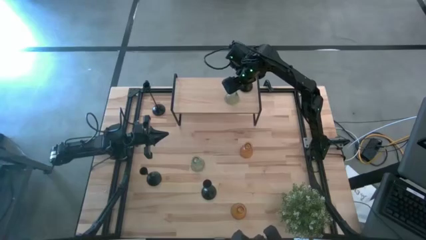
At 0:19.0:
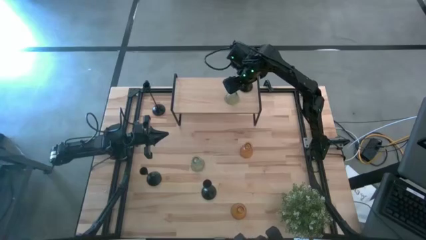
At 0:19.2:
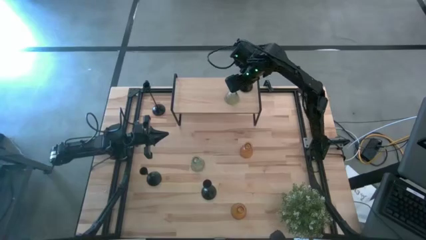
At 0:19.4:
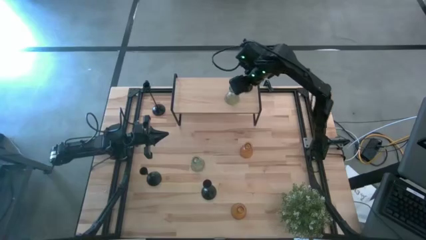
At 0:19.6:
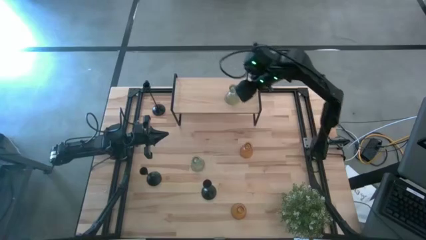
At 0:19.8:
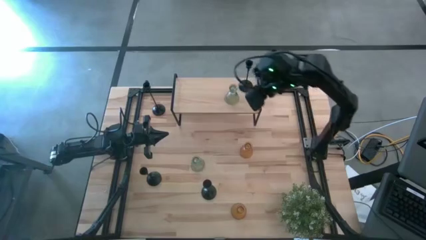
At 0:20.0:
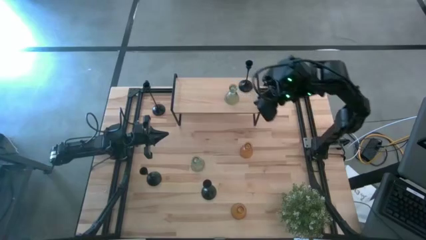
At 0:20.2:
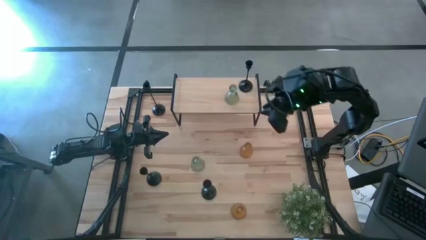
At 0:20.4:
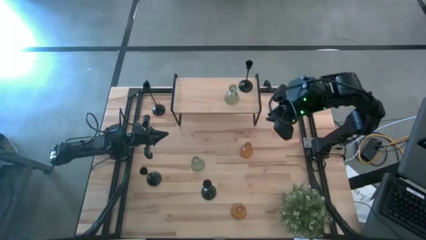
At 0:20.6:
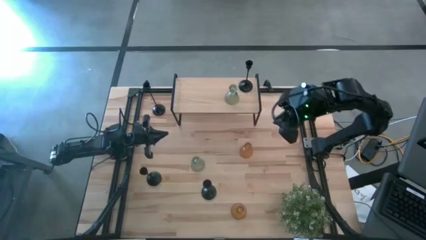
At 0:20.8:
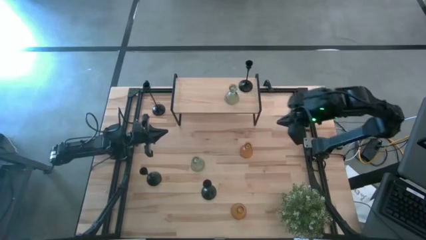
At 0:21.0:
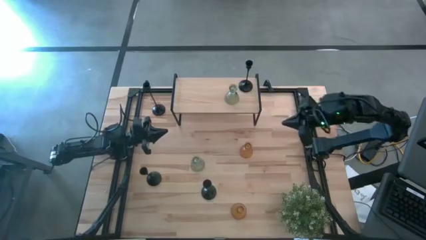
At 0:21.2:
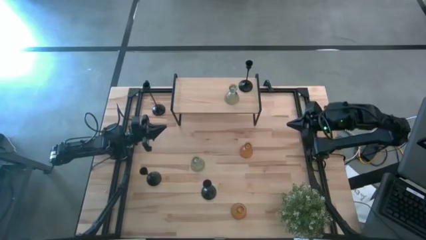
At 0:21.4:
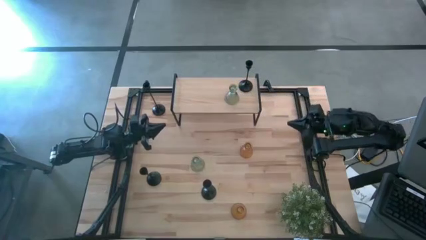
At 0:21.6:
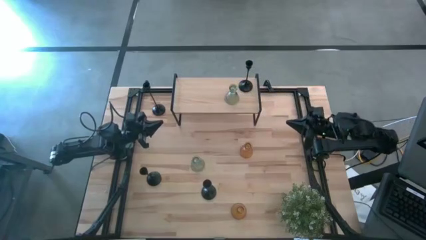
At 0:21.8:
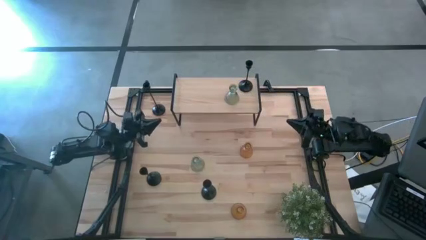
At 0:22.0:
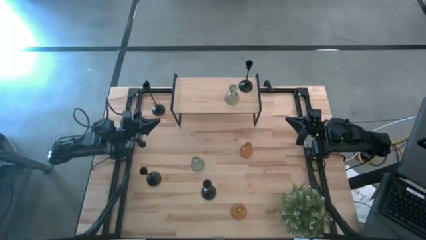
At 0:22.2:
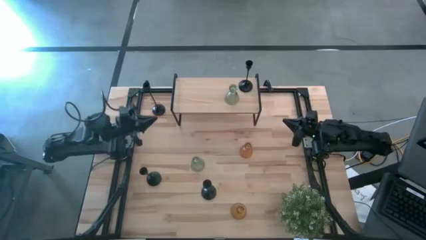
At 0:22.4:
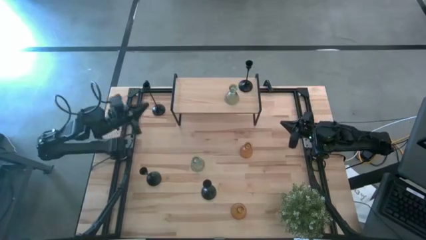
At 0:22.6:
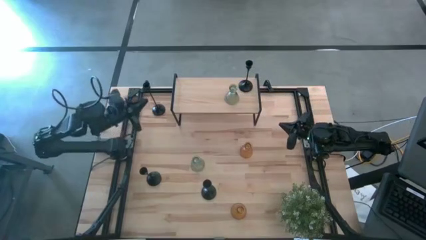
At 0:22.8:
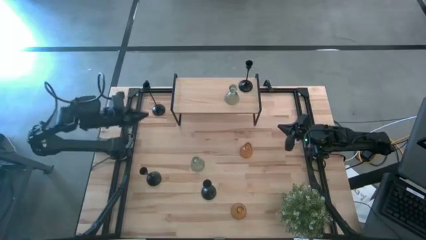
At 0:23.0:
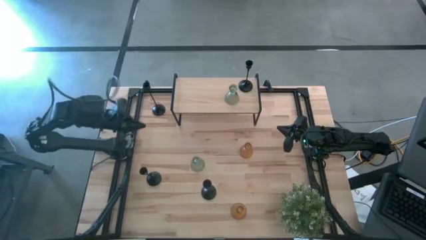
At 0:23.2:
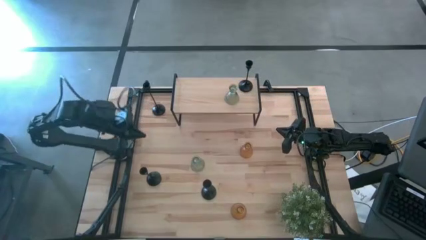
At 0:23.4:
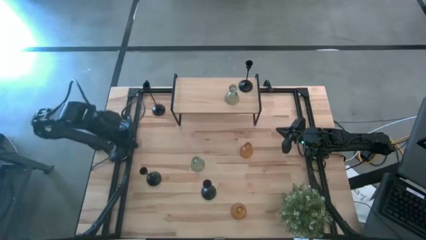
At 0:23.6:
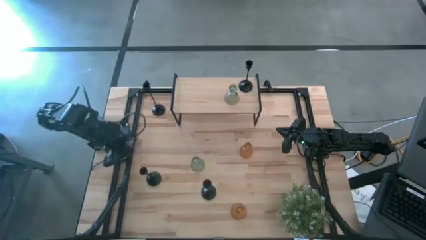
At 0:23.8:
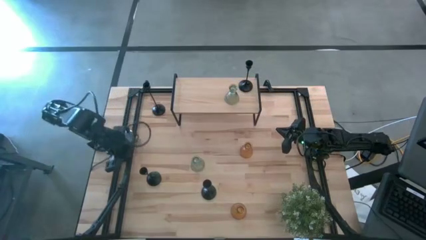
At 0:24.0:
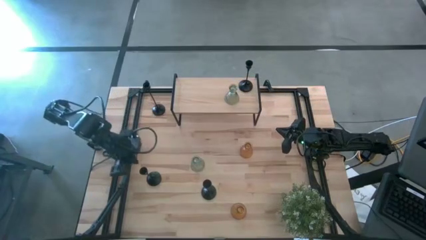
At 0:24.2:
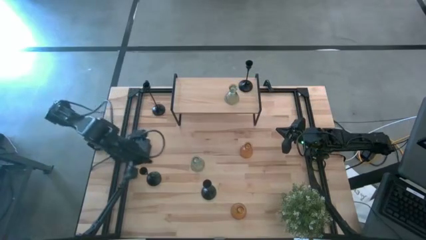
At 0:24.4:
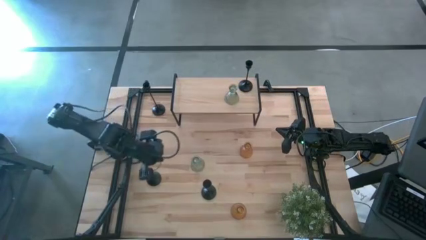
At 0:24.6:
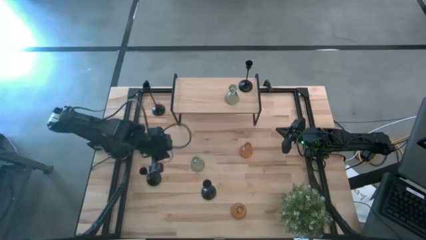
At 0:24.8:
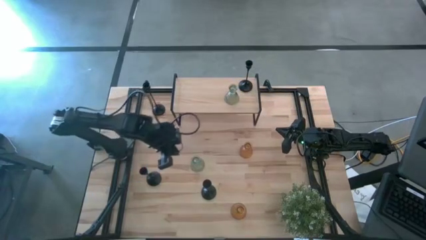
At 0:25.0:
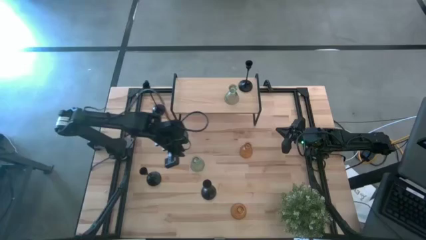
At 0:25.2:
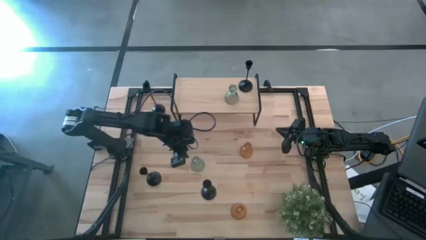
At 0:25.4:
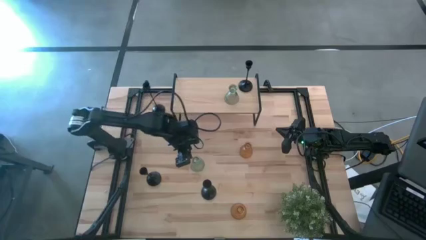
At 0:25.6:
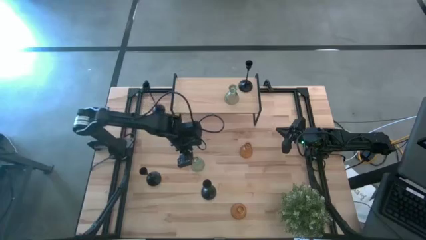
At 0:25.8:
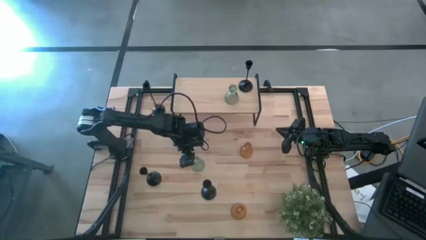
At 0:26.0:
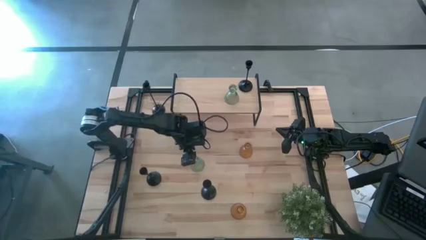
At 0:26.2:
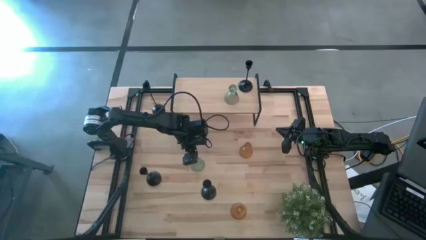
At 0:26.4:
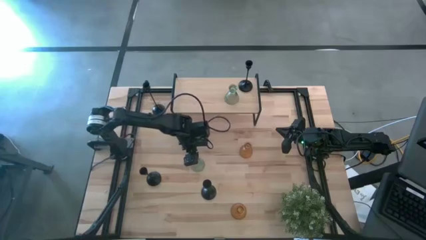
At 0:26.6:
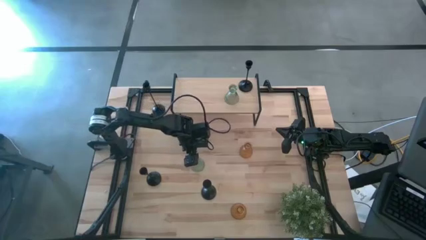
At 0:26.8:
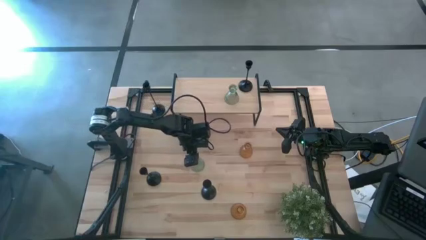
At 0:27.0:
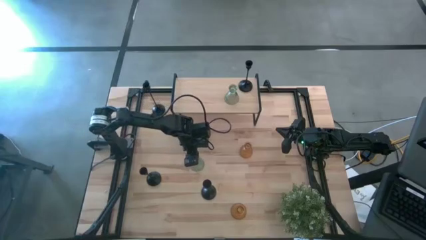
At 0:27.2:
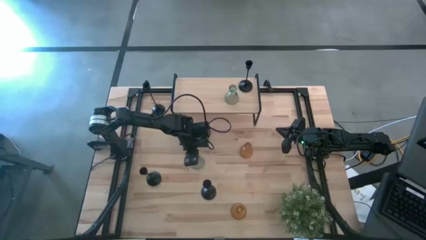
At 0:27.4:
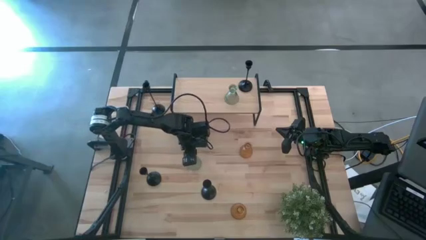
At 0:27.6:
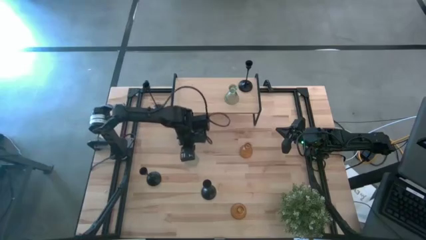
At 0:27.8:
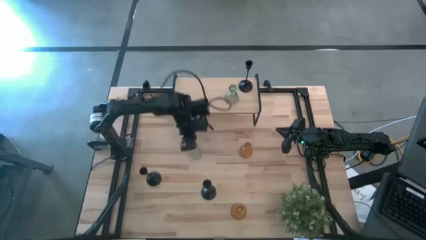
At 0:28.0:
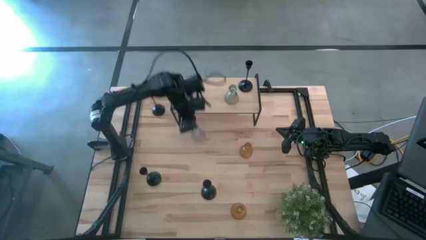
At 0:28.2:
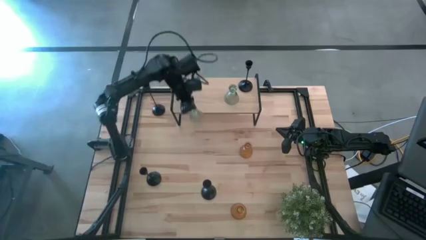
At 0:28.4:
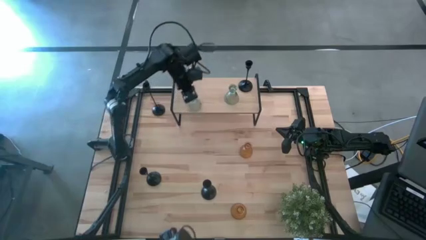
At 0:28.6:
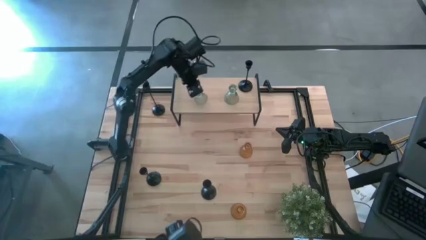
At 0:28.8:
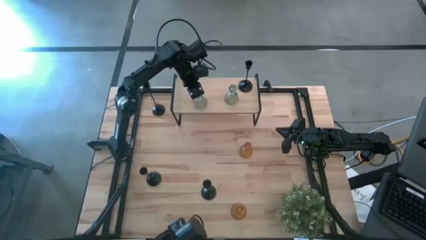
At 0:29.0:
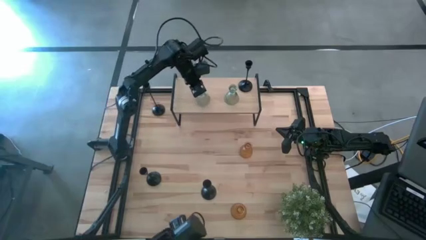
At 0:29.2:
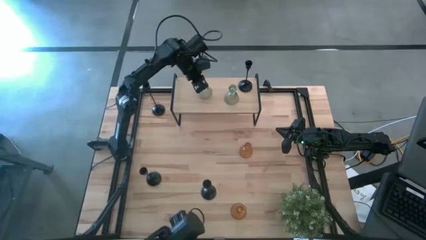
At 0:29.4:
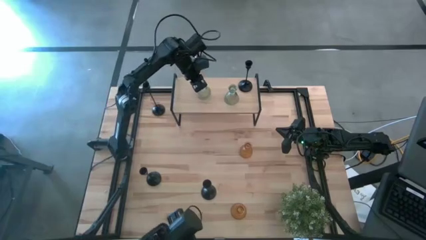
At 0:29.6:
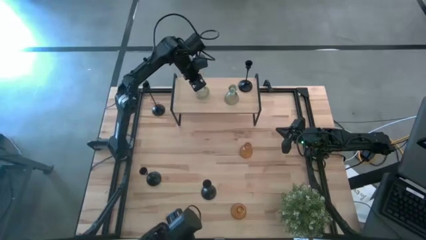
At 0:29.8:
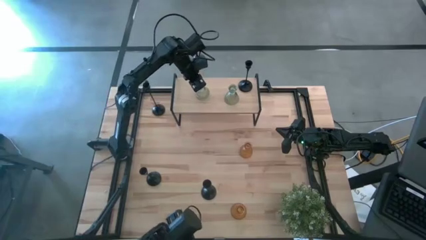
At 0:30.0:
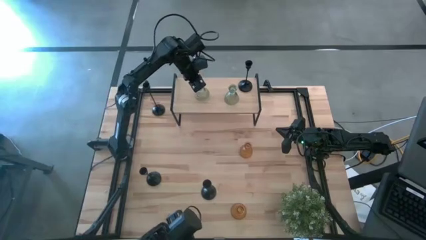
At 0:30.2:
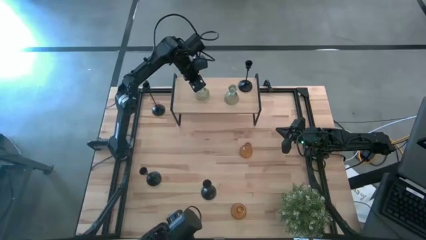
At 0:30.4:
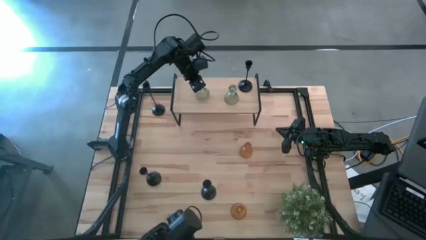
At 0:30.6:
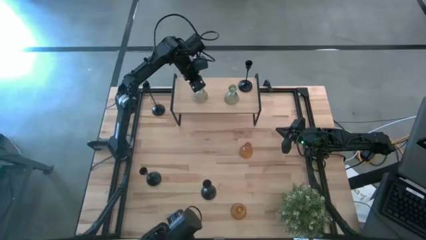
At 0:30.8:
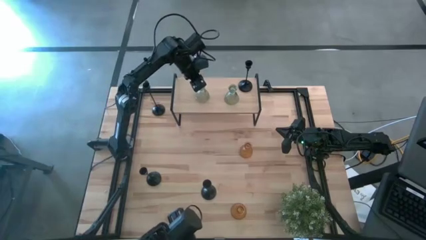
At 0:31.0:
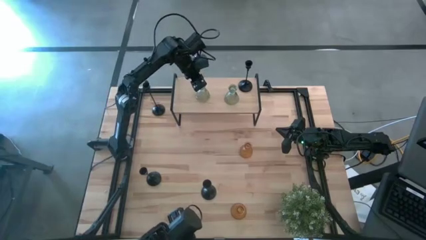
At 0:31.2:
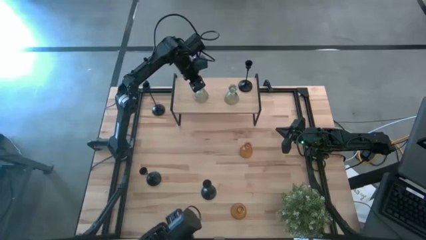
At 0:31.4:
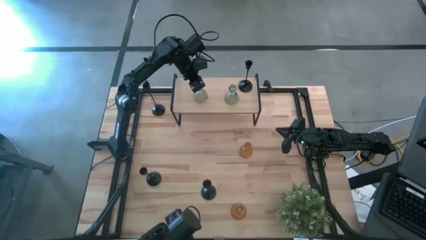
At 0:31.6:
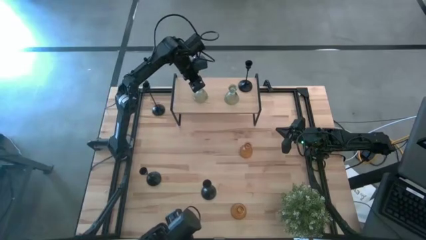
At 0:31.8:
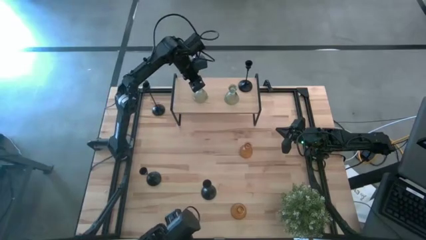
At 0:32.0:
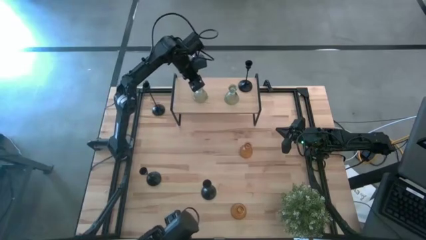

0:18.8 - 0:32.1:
Task: Pick & Place candle stick holders
Put the green glass candle holder on the shelf
